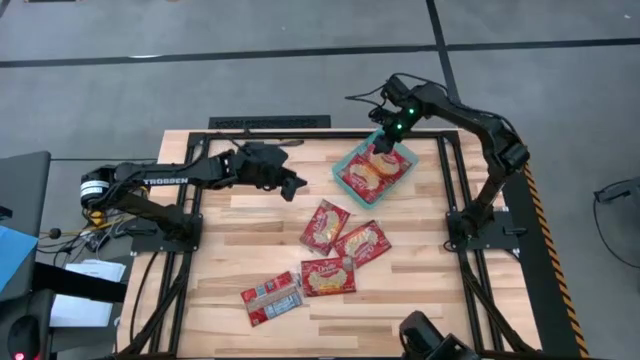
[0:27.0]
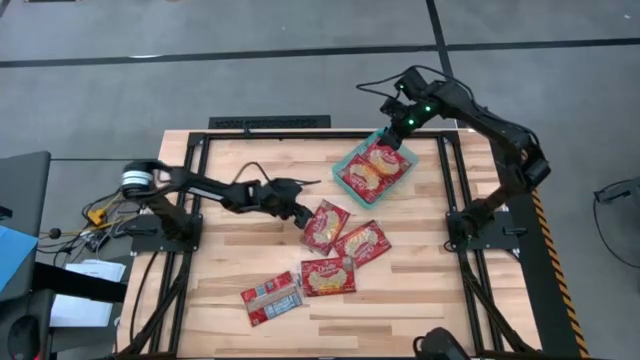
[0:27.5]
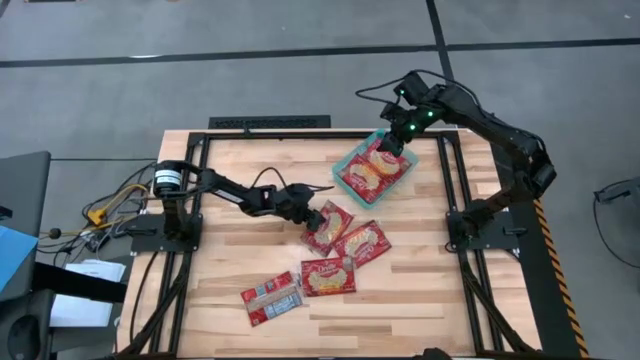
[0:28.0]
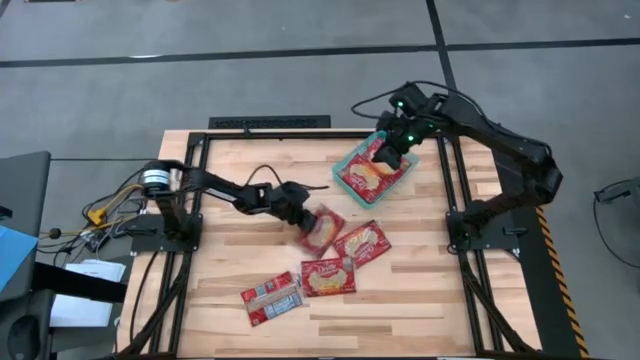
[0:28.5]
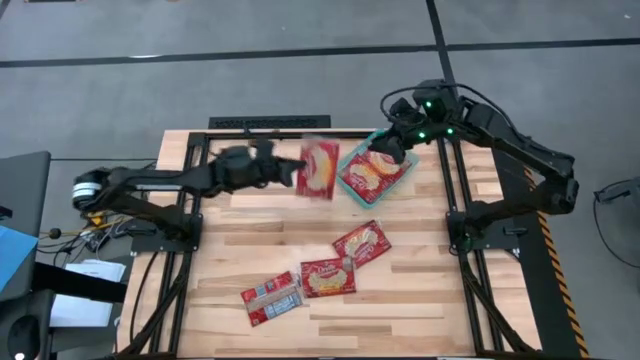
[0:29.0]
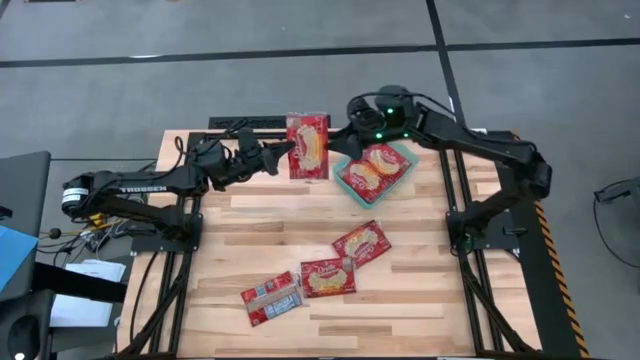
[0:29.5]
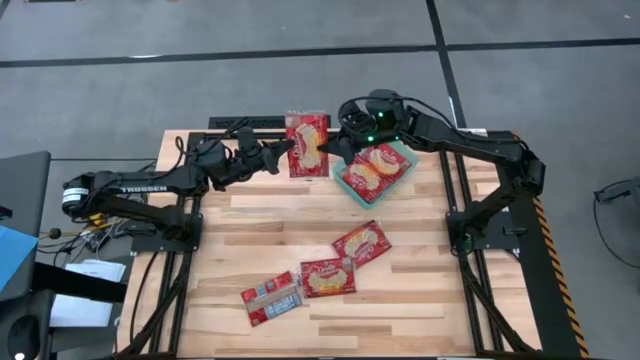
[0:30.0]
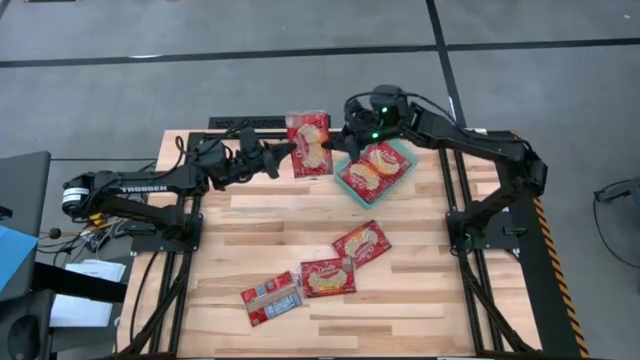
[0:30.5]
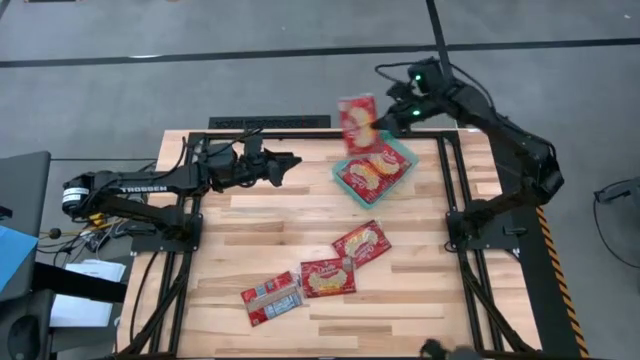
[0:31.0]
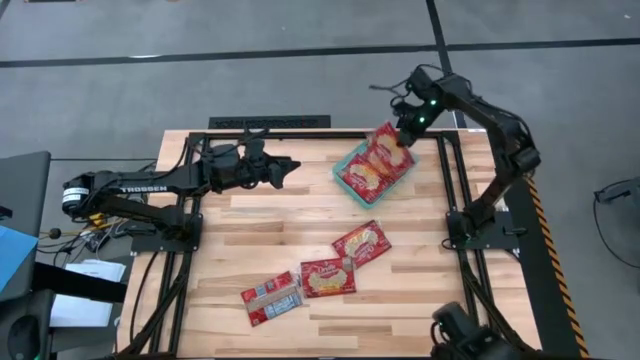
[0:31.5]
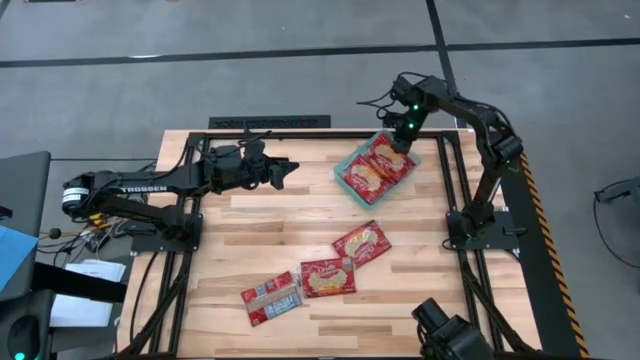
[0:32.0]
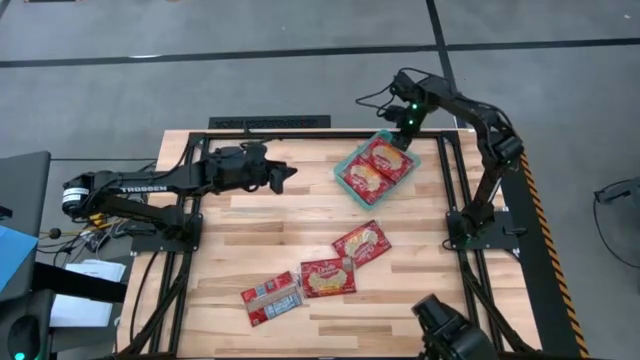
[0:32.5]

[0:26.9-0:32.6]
Task: Sort popcorn bags into baskets
Put the red popcorn bag into the green bin

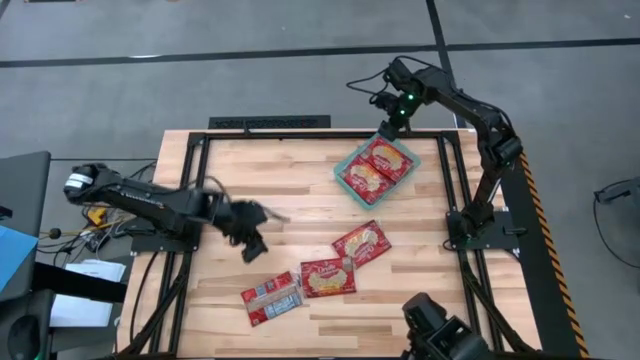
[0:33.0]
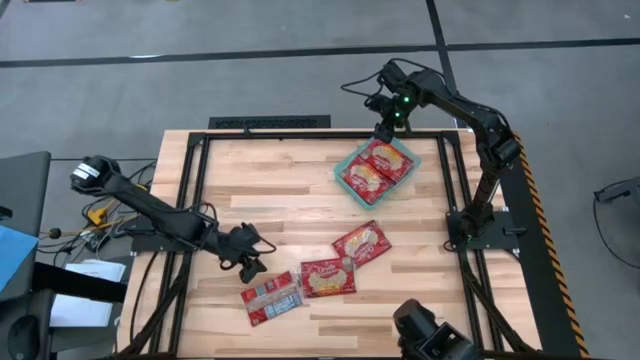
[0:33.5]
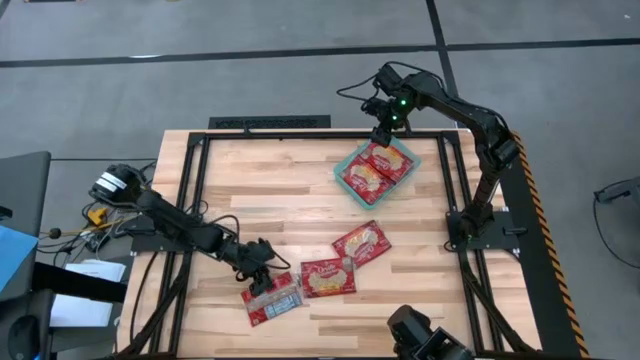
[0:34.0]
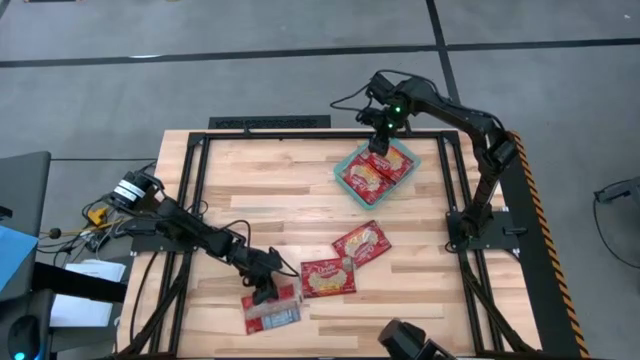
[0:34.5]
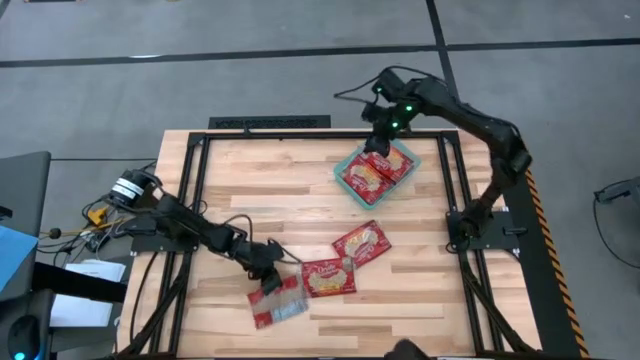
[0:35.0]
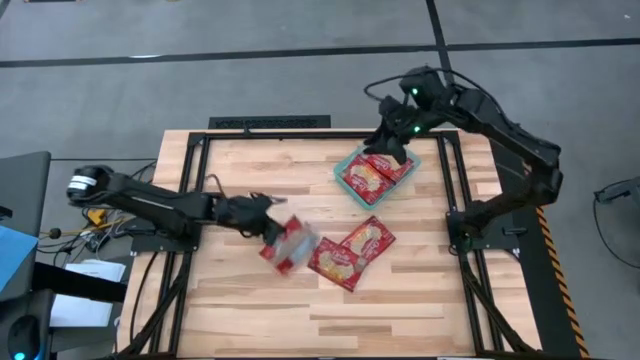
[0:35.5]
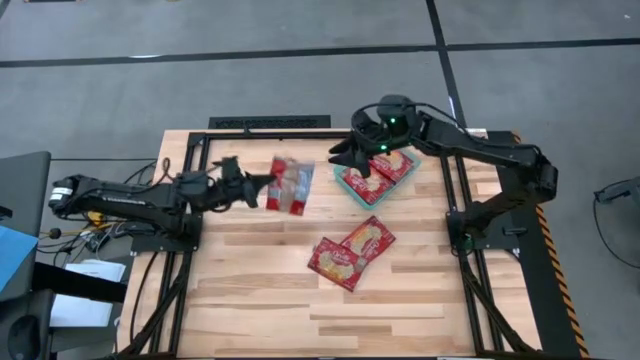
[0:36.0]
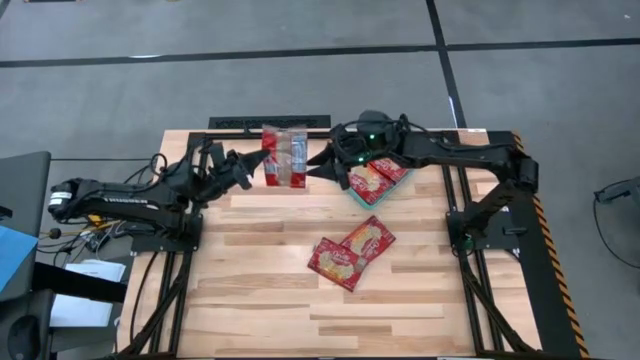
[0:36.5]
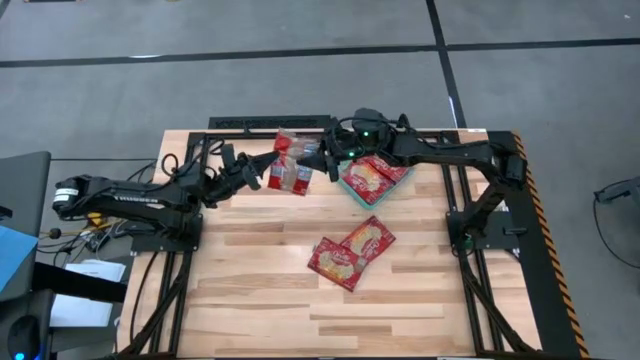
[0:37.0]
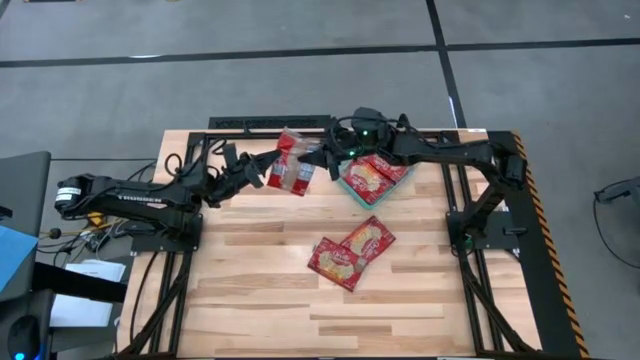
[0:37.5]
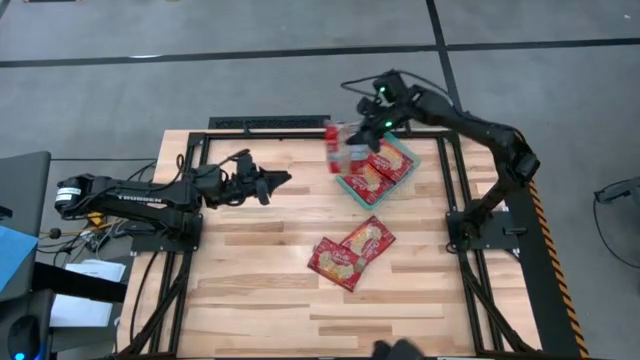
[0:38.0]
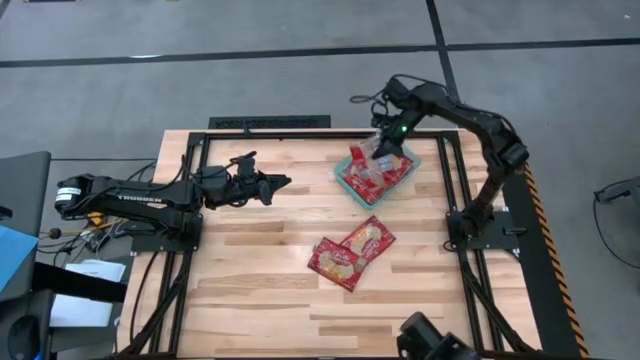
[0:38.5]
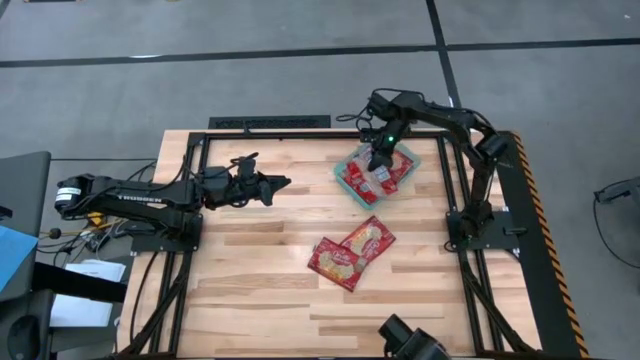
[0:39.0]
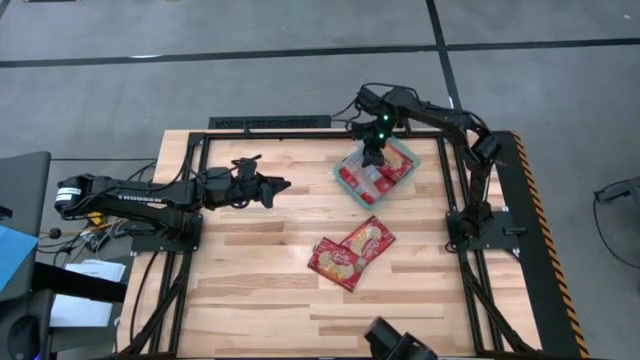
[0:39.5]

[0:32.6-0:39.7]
Put the red popcorn bag into the green bin

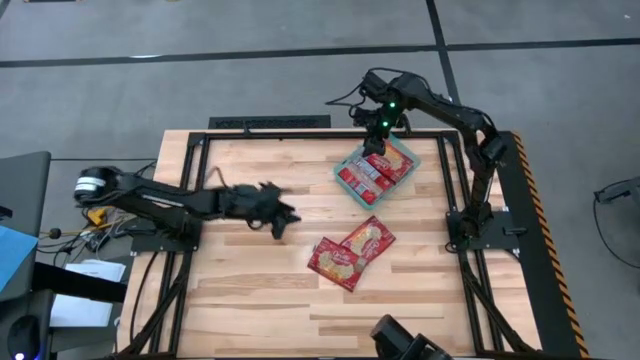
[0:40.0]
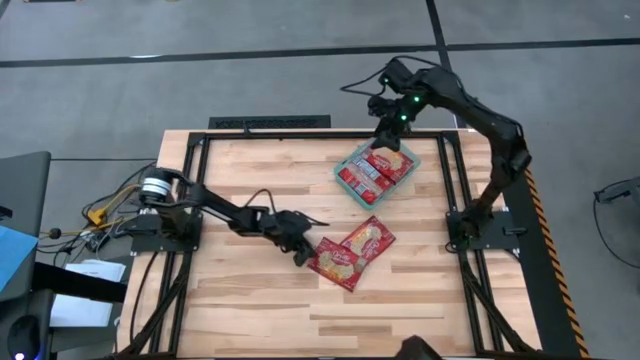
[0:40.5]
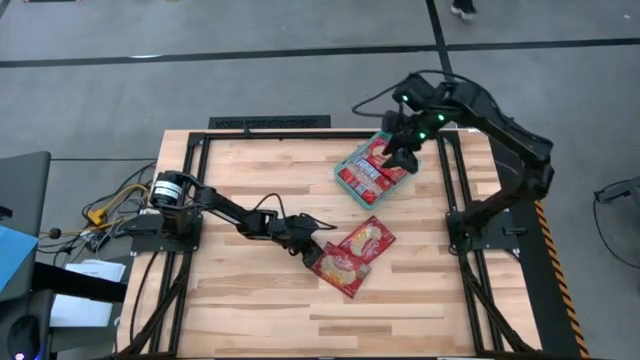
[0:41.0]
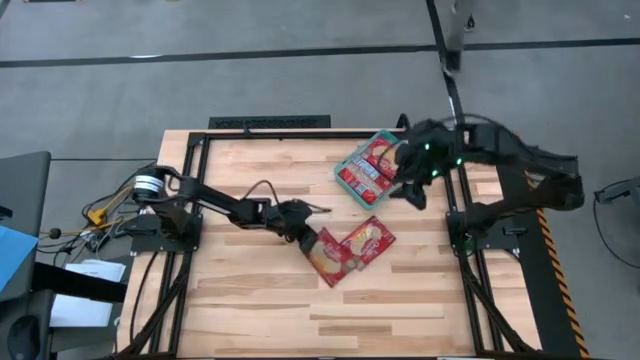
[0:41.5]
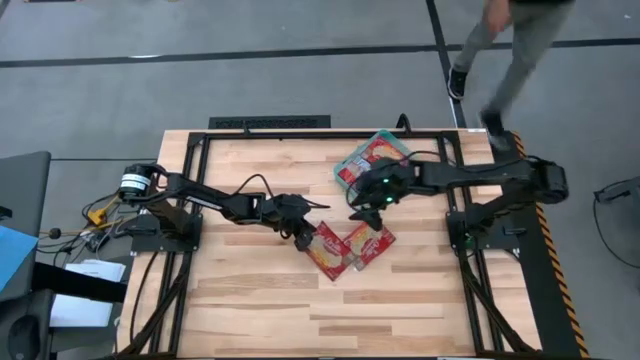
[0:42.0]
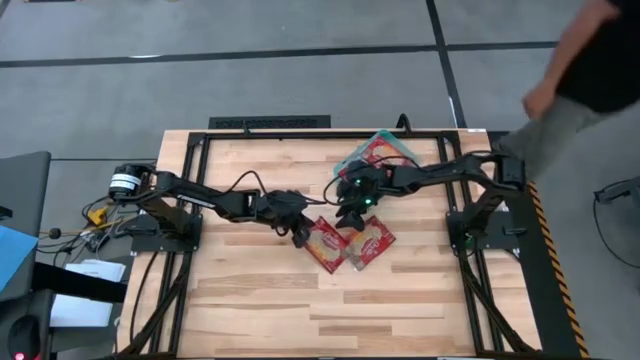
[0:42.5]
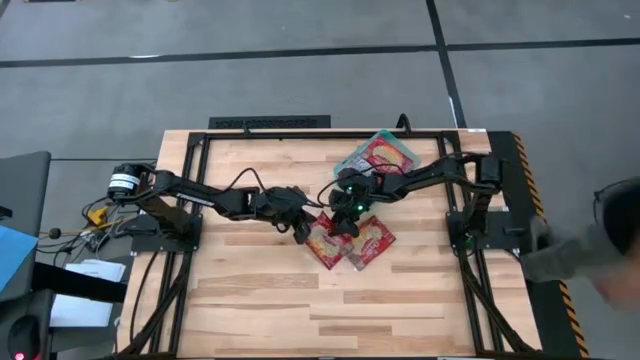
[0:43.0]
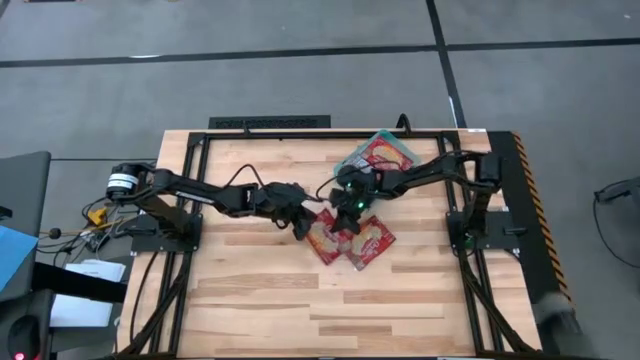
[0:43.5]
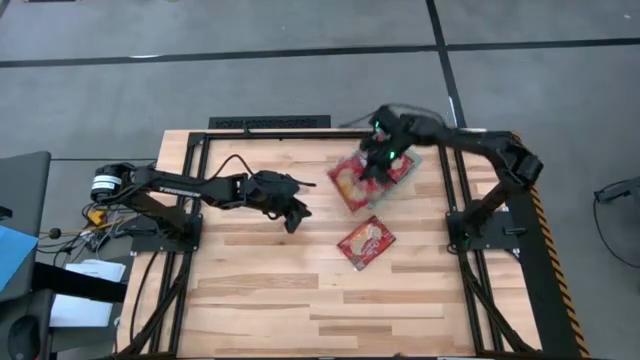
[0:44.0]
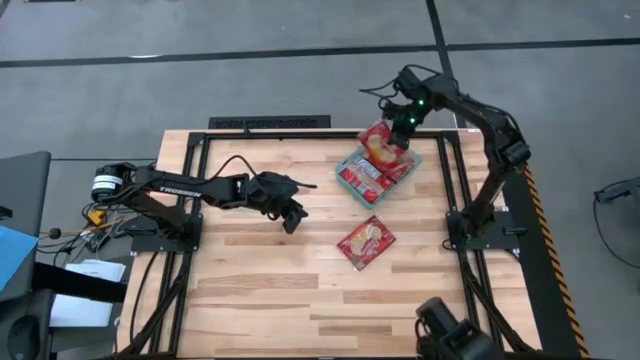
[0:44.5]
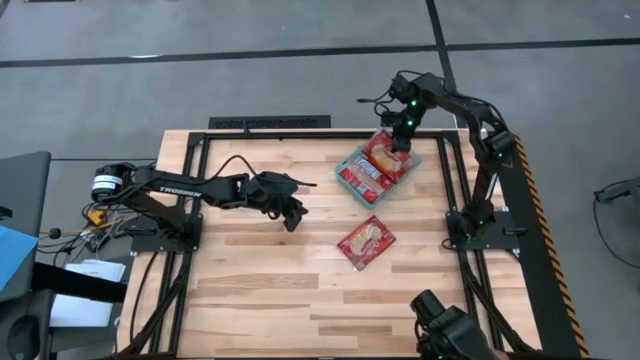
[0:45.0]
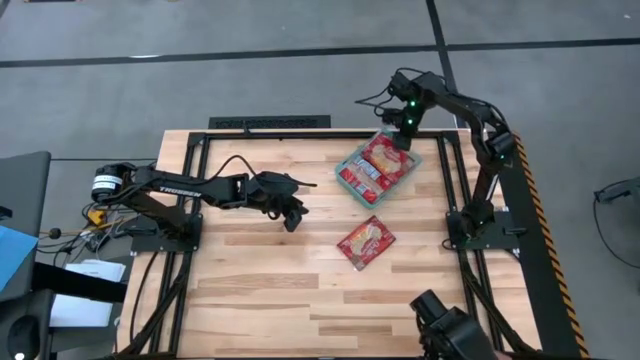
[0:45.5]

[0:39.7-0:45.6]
Put the red popcorn bag into the green bin

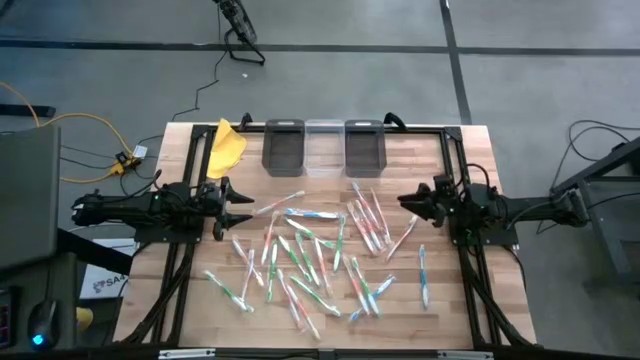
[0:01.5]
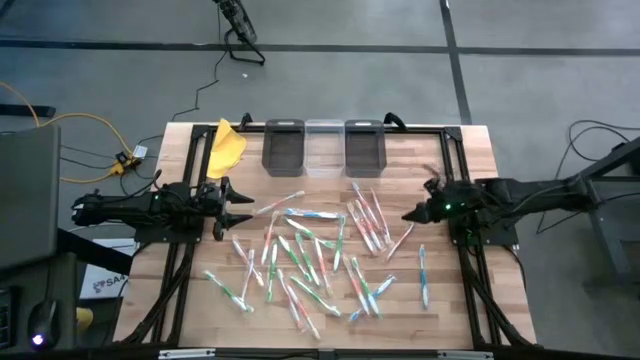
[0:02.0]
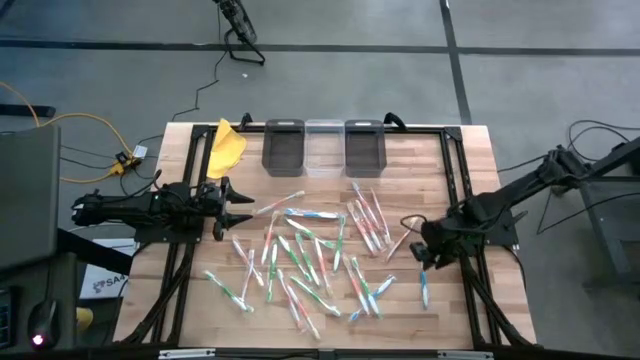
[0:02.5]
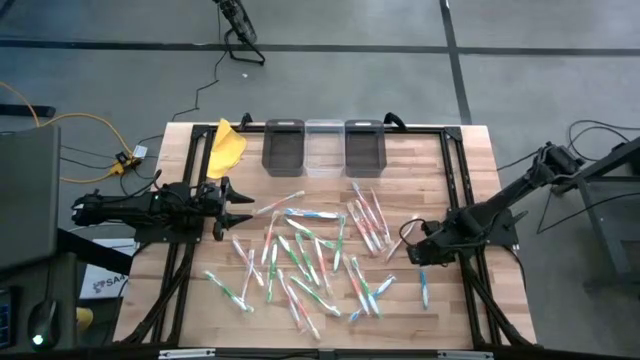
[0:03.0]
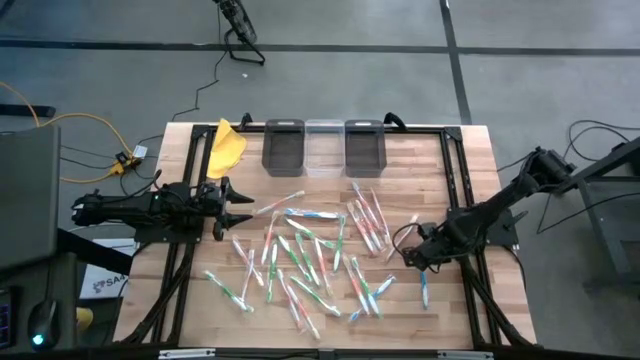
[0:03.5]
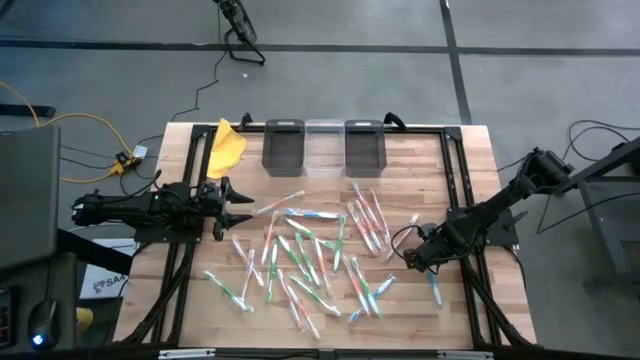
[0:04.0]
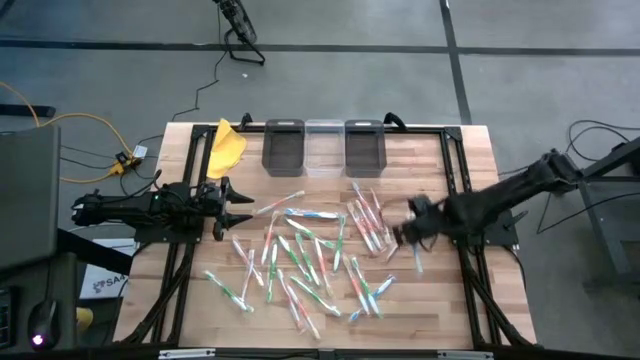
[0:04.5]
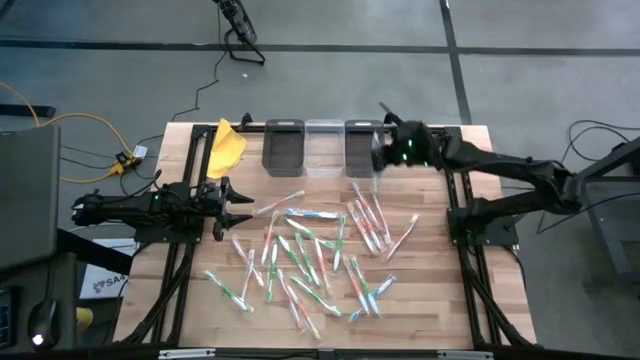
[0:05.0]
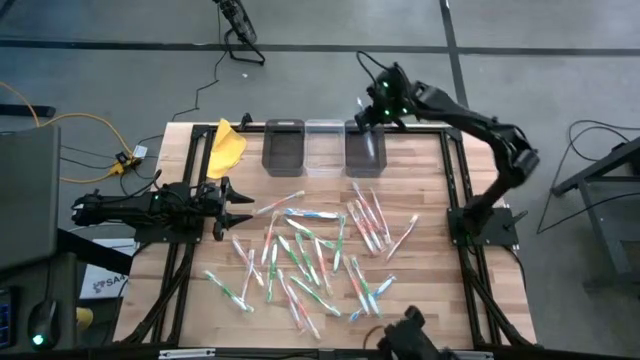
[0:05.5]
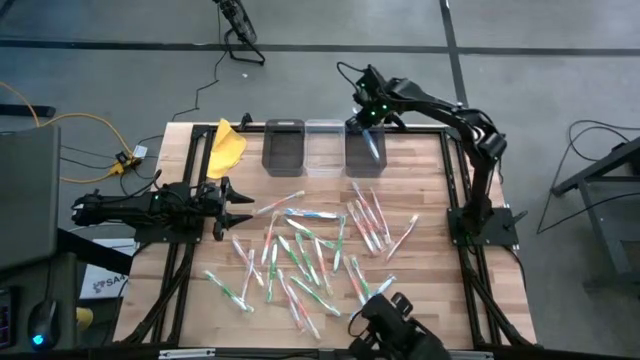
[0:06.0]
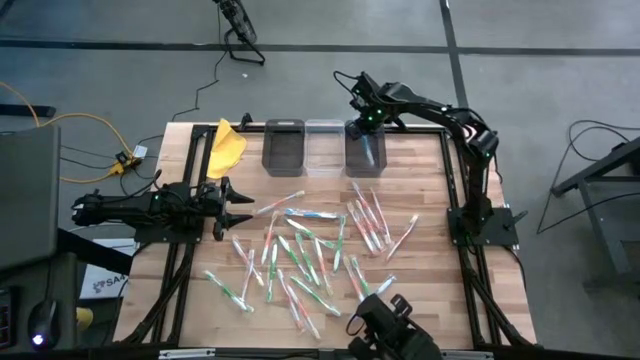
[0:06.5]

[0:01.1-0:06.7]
Task: Pick & Place Toothbrushes
Put the blue toothbrush into the right black bin
